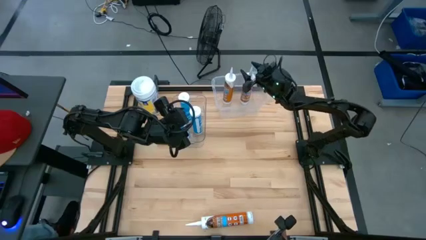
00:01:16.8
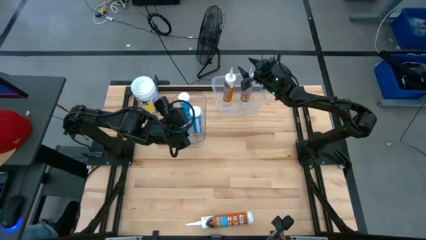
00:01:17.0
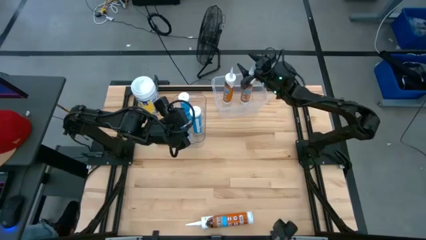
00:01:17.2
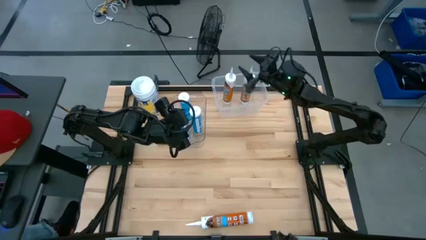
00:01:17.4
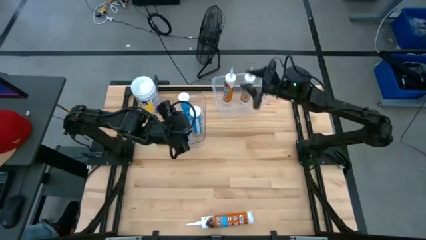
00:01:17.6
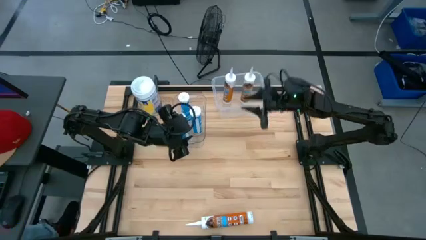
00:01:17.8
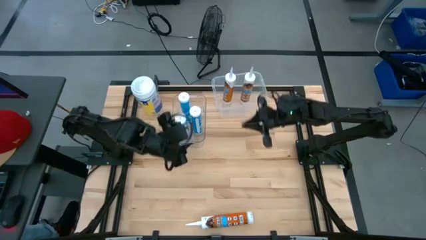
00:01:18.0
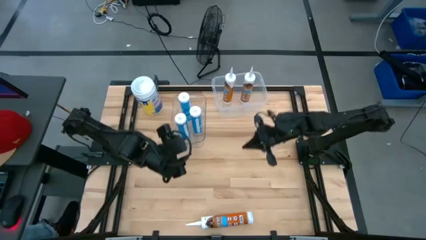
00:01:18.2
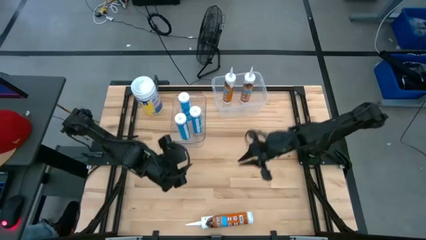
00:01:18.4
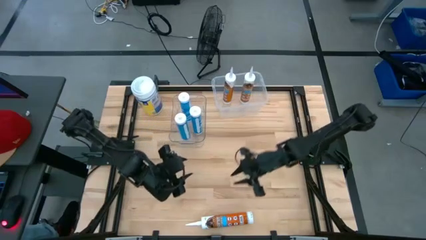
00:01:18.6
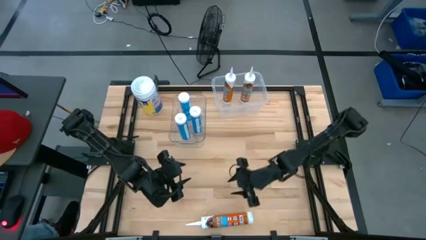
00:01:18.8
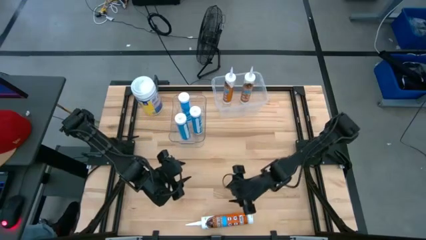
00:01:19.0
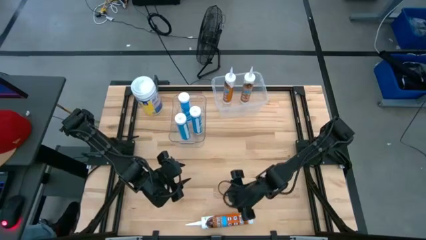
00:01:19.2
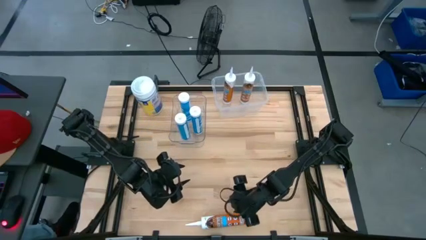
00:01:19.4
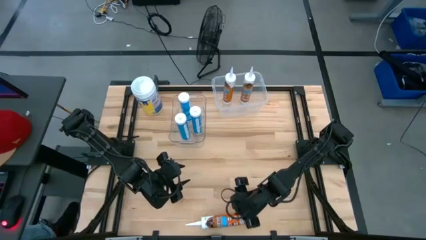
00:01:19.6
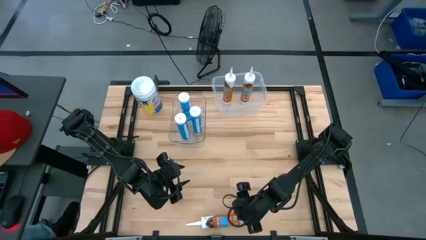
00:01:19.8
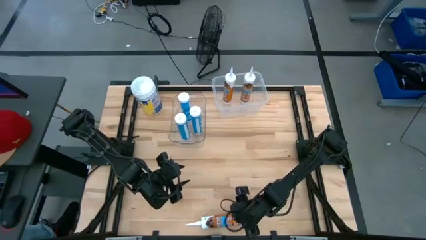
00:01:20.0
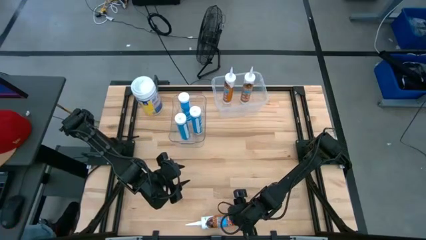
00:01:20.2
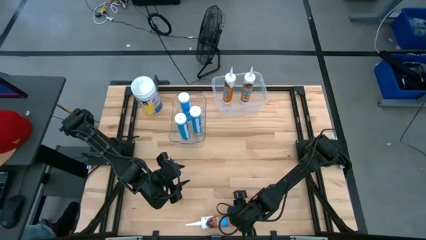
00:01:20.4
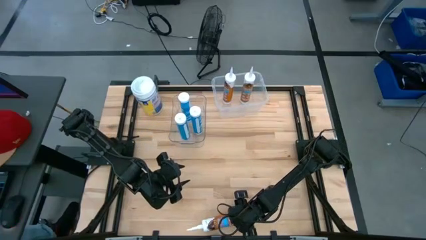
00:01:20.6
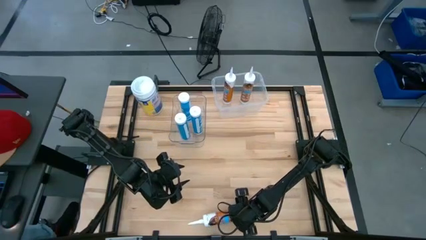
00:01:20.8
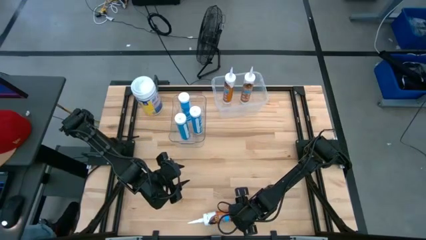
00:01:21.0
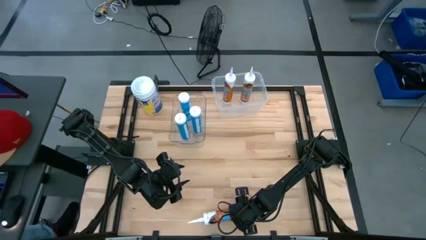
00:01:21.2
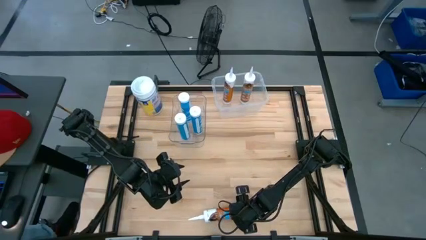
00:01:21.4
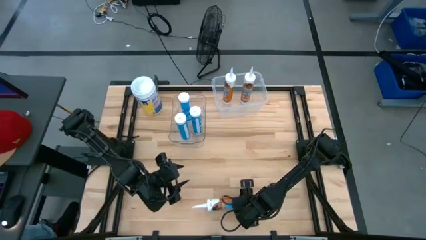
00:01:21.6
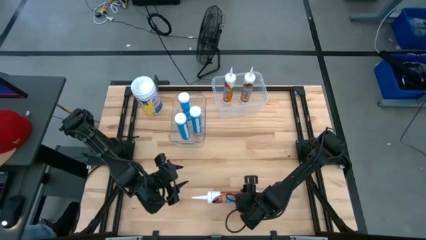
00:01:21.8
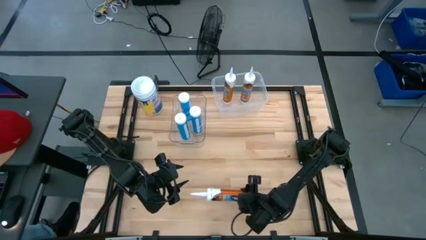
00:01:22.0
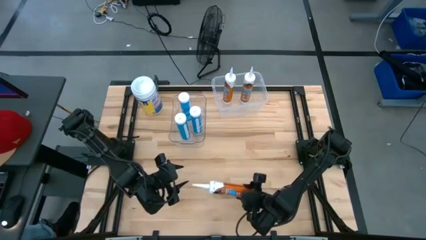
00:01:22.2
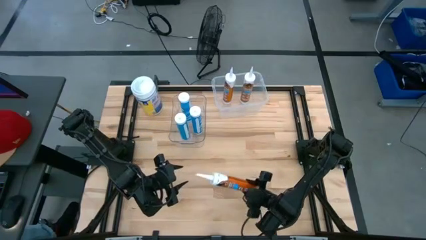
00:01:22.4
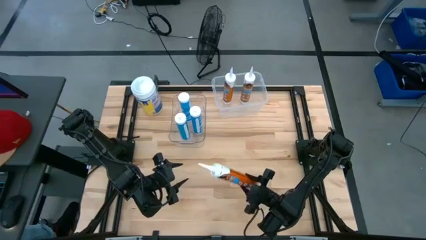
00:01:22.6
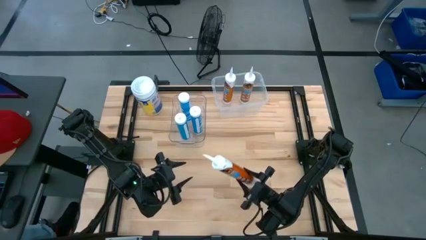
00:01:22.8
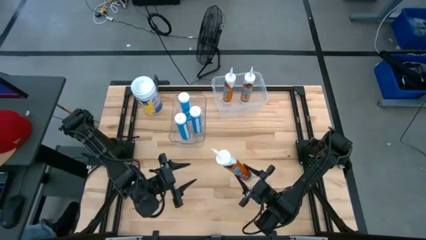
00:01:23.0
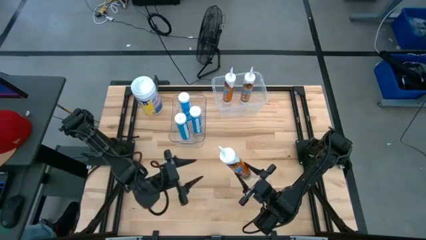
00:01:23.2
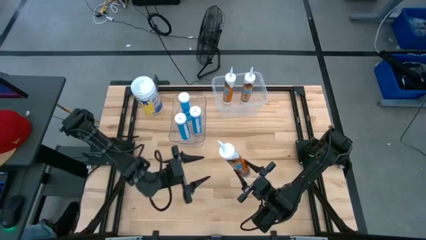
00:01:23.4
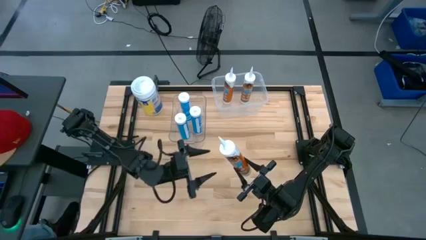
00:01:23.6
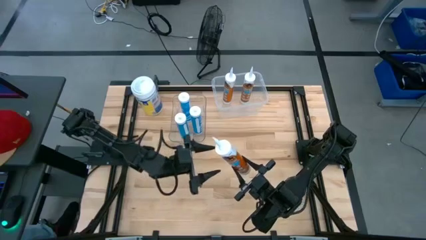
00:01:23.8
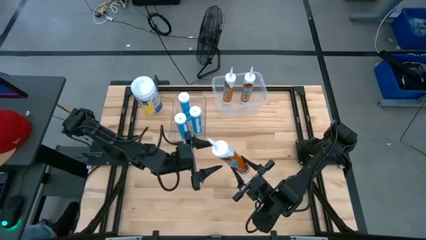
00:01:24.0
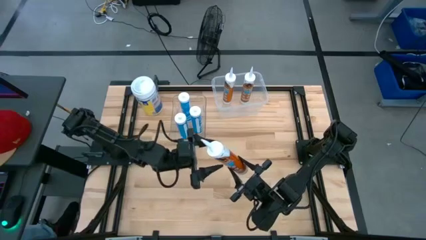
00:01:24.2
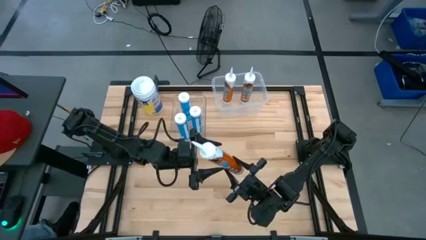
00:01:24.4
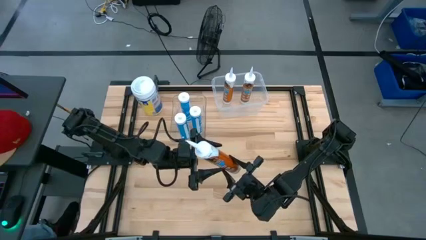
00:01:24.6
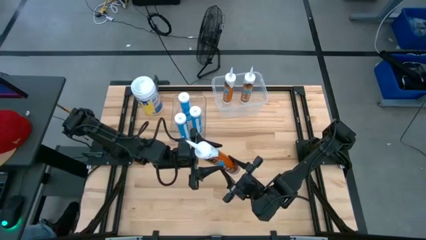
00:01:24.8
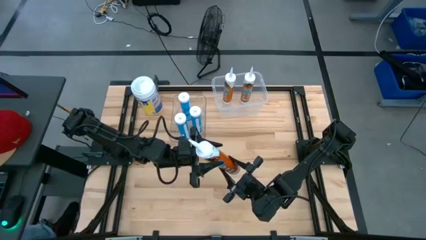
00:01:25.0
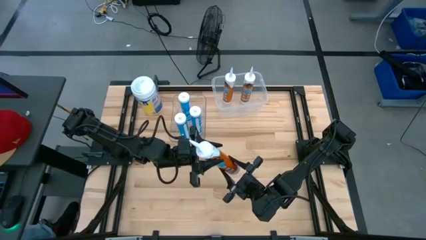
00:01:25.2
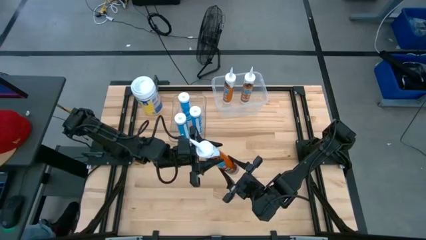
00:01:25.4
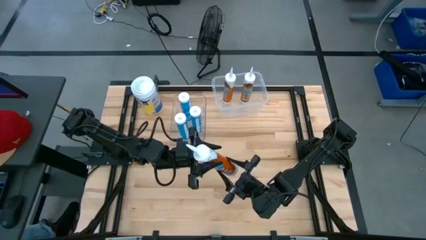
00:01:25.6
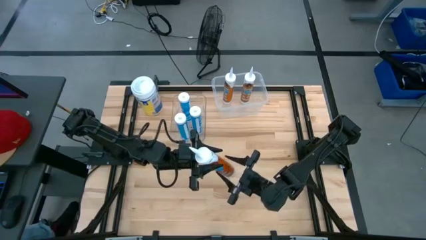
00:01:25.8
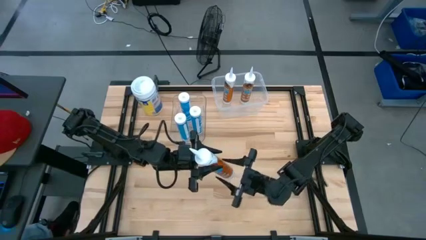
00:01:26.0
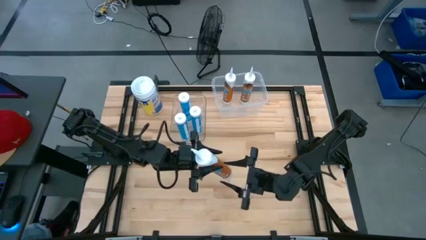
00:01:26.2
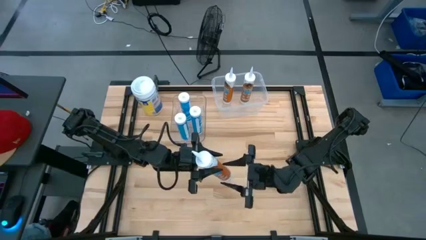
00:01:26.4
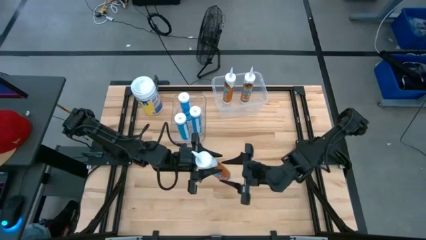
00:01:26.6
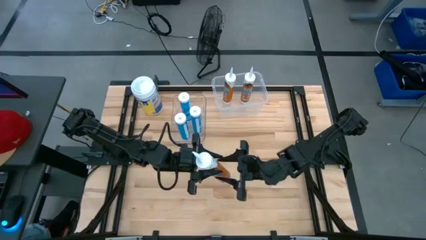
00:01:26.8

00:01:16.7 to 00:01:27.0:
Task: Pick & place silicon tubes, Sealant and Lysol wipes
Put the orange sealant into the white bin

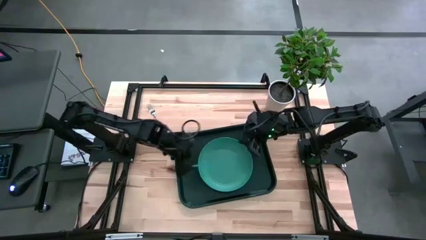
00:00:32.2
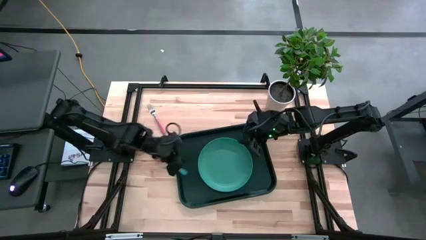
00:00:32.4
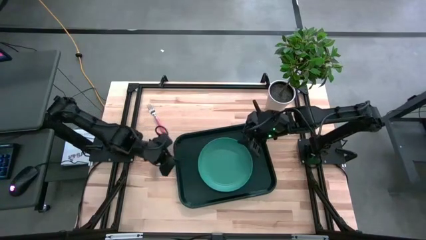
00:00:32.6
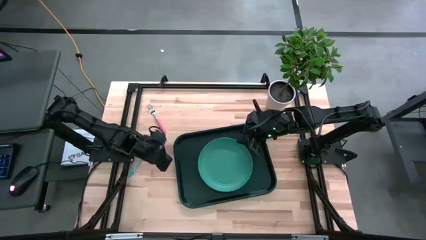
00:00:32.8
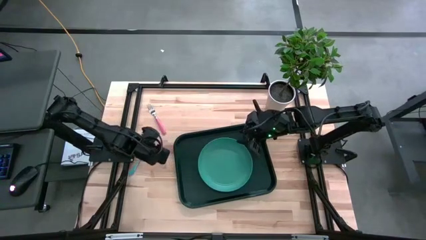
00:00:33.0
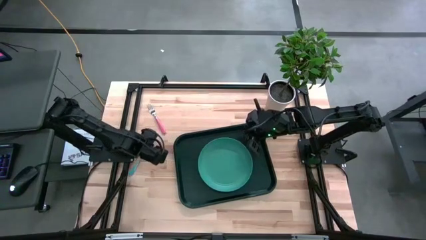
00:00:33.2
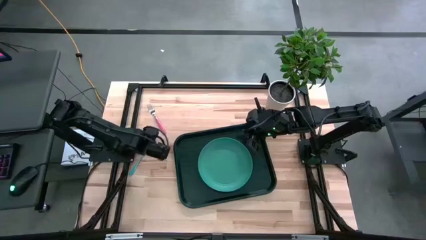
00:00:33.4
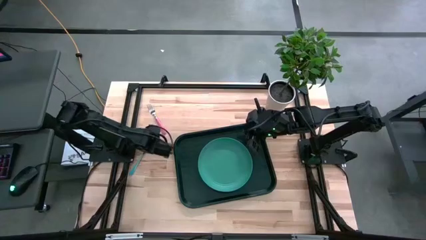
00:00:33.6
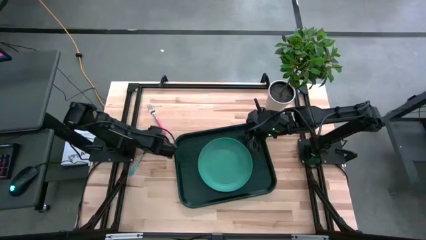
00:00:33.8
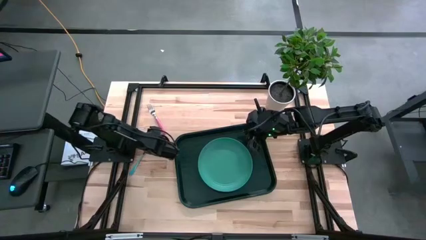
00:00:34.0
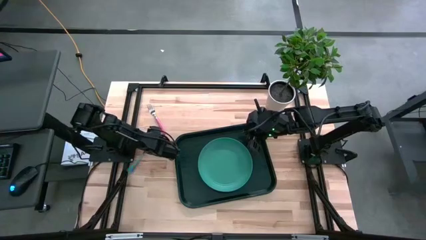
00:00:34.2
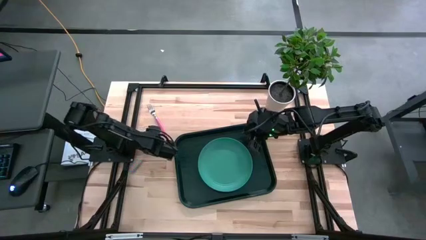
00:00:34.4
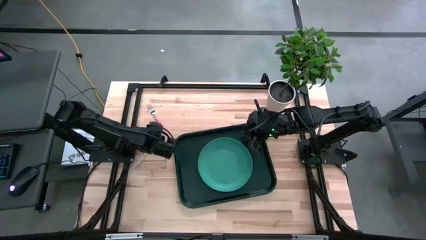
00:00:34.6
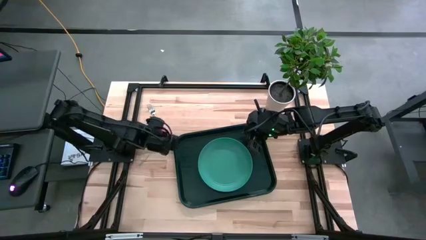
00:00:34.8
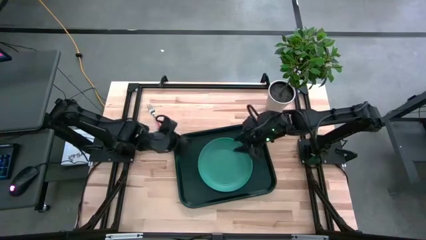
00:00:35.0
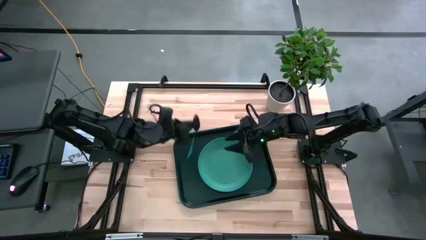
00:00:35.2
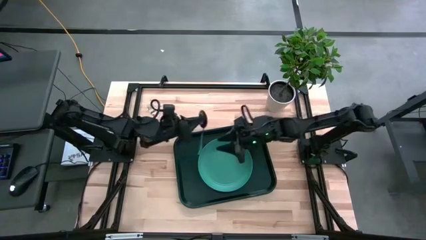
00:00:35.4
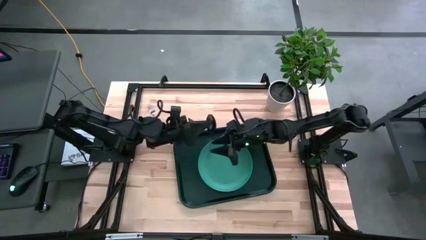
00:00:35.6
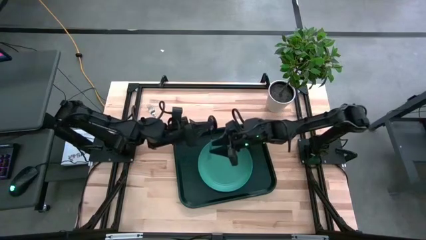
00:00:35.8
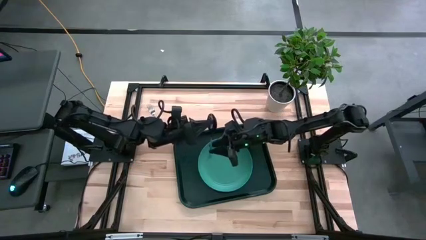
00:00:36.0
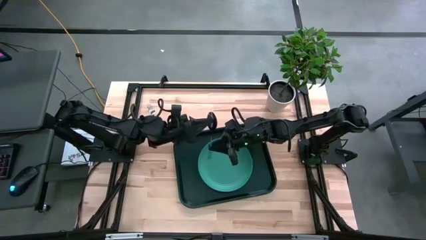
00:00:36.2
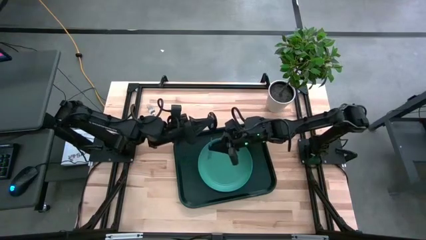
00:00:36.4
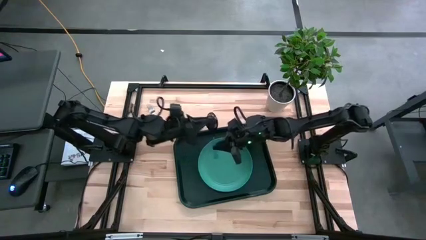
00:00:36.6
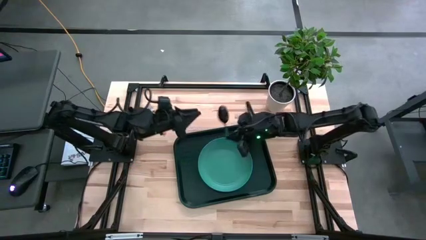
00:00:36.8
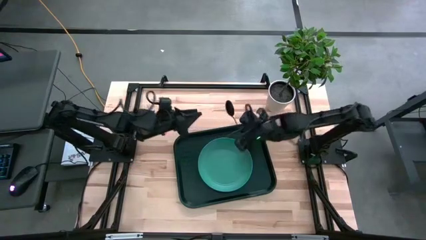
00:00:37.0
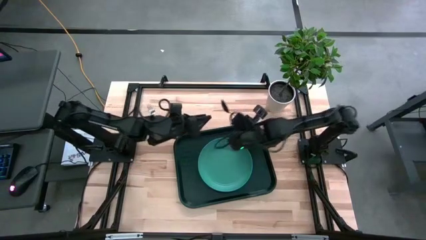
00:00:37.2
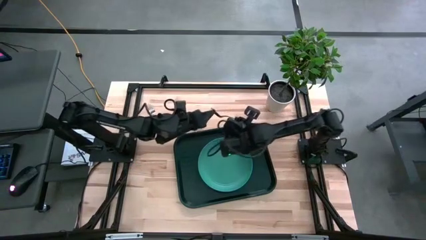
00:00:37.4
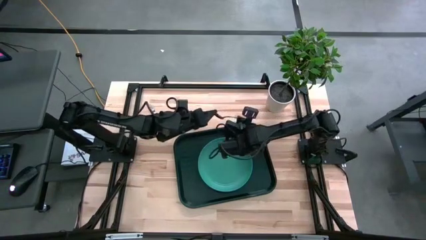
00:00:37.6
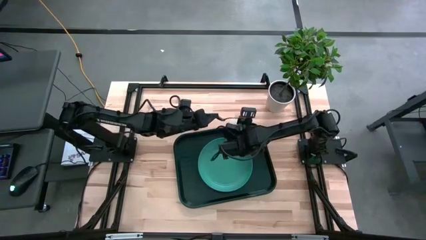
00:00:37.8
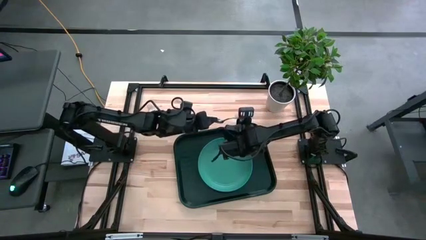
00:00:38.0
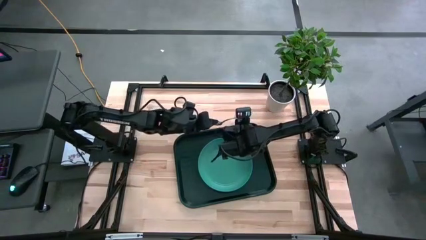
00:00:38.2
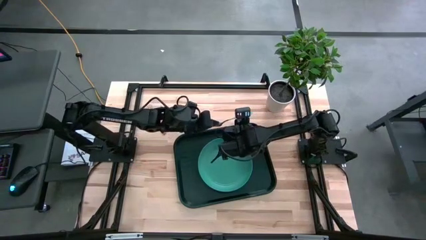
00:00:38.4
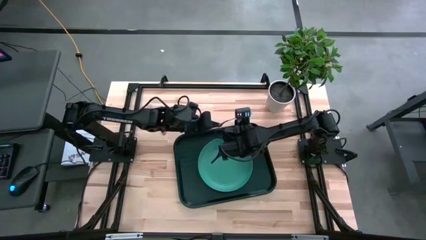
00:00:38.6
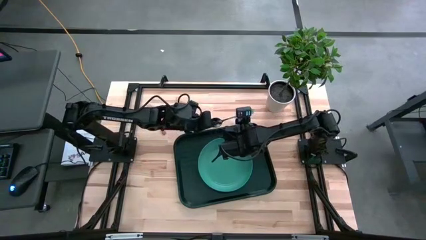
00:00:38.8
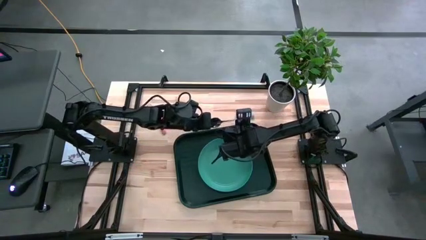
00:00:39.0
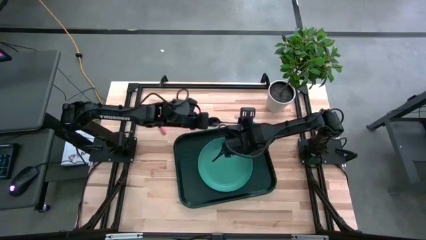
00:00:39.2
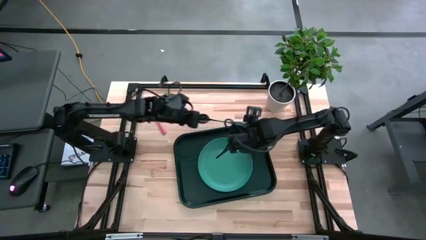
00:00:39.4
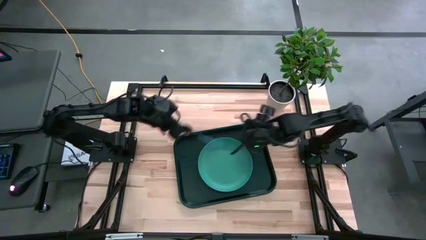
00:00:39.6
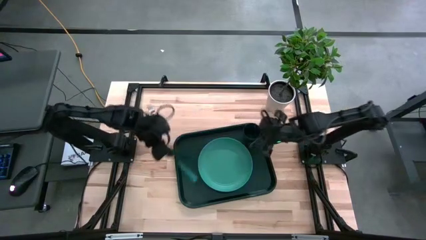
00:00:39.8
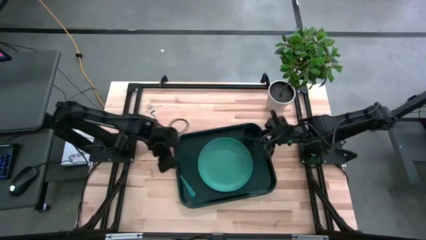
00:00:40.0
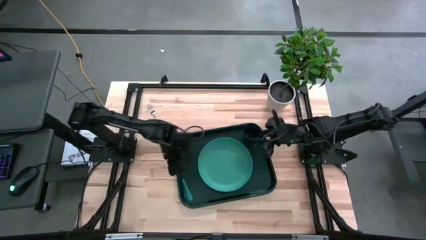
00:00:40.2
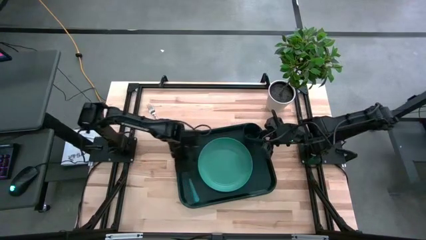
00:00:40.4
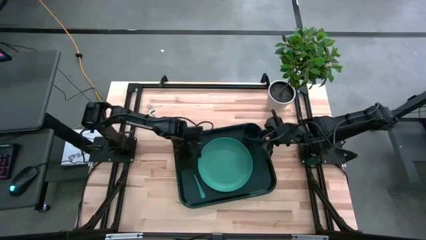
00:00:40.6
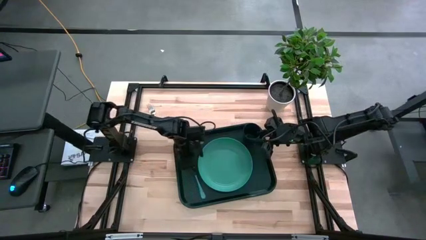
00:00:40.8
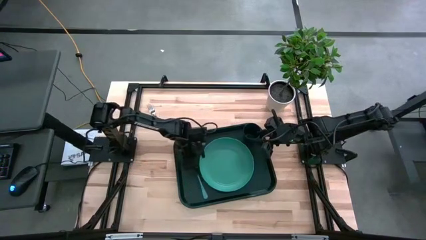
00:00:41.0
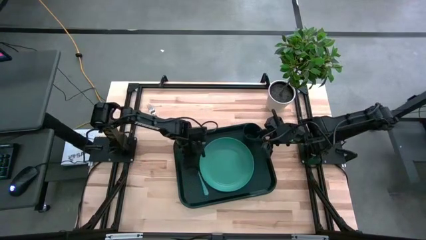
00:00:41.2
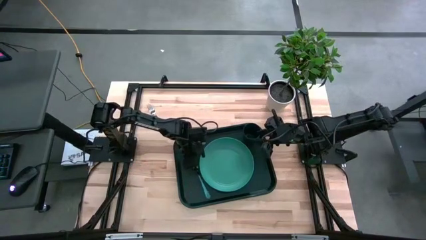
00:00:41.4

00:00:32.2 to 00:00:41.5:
Task: Pick and place plate/cup/fork/spoon on tray
Put the blue spoon on the black serving tray to the left of the green plate
